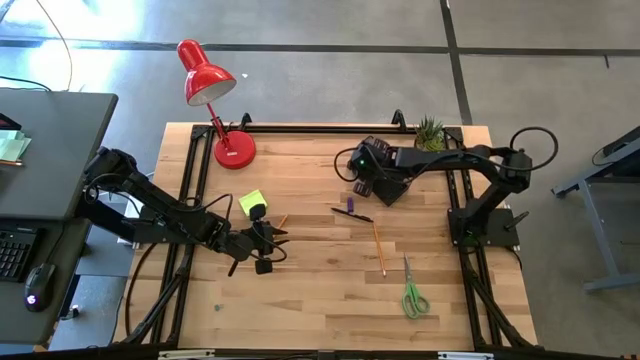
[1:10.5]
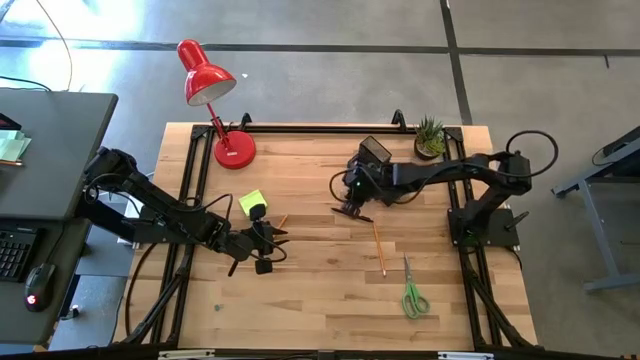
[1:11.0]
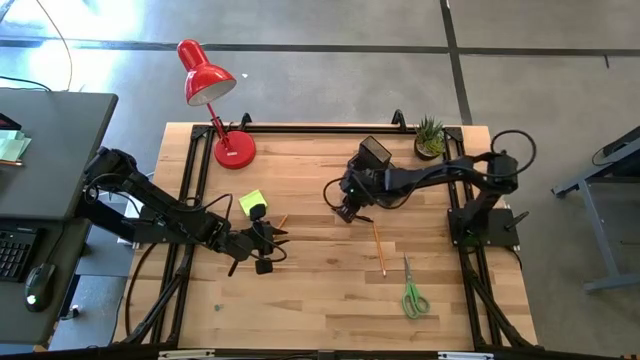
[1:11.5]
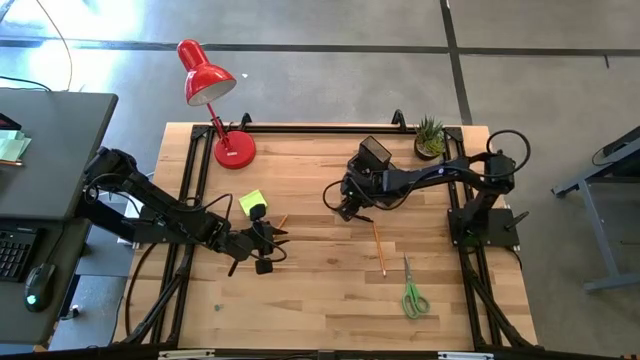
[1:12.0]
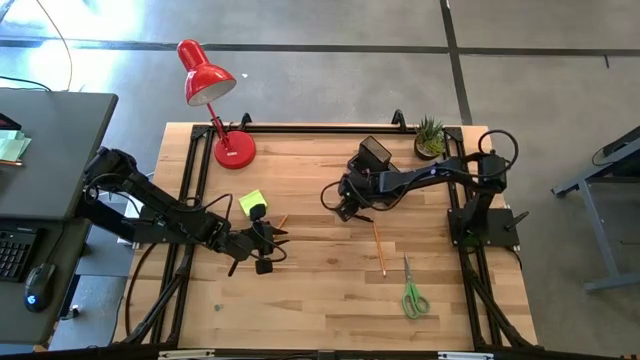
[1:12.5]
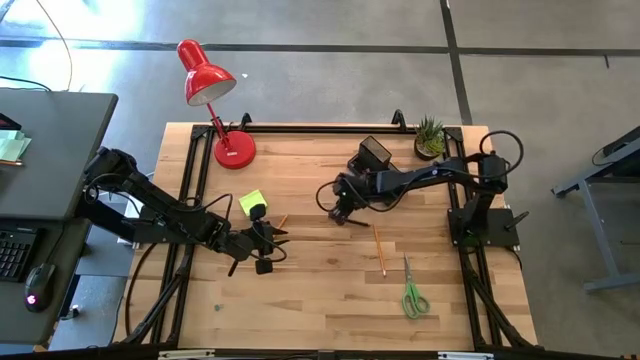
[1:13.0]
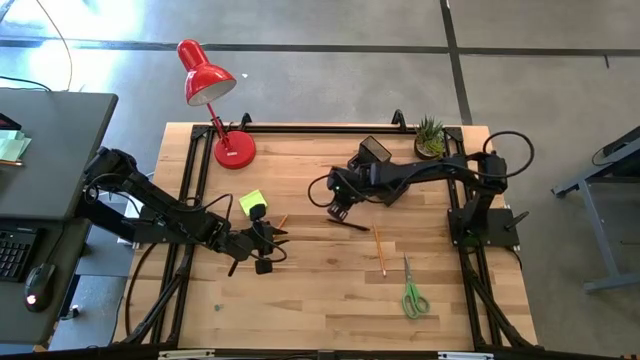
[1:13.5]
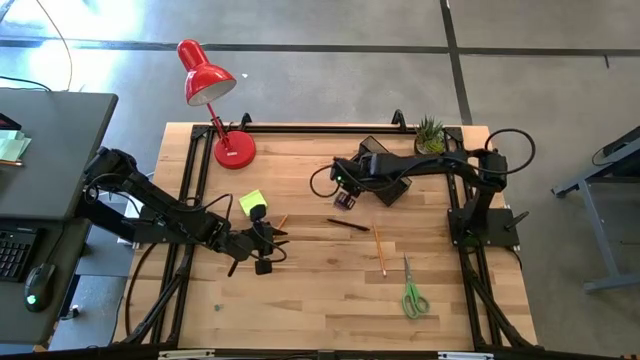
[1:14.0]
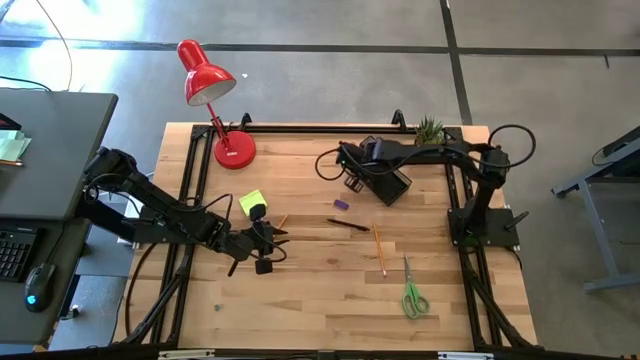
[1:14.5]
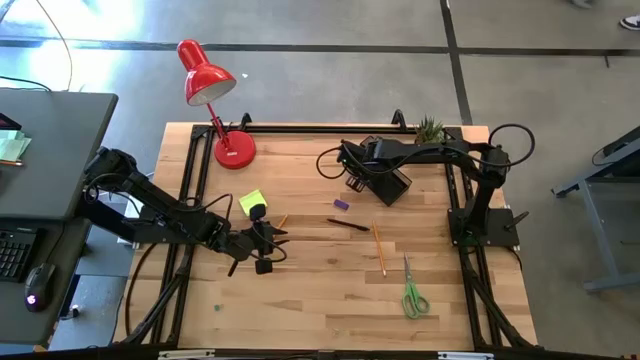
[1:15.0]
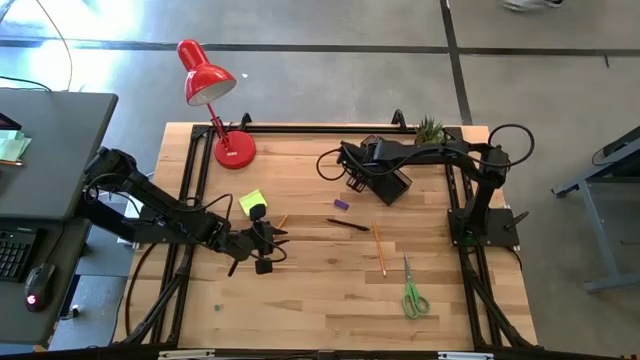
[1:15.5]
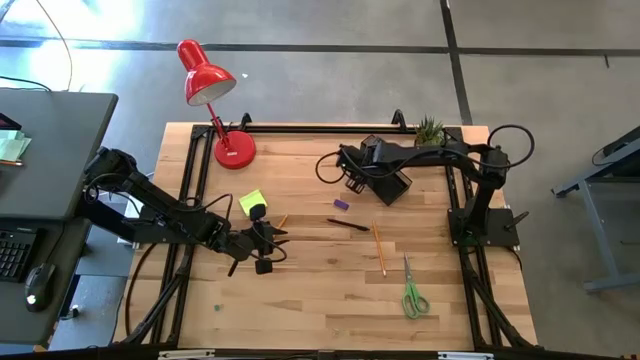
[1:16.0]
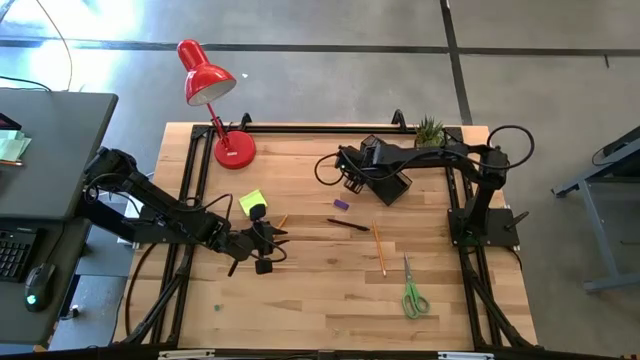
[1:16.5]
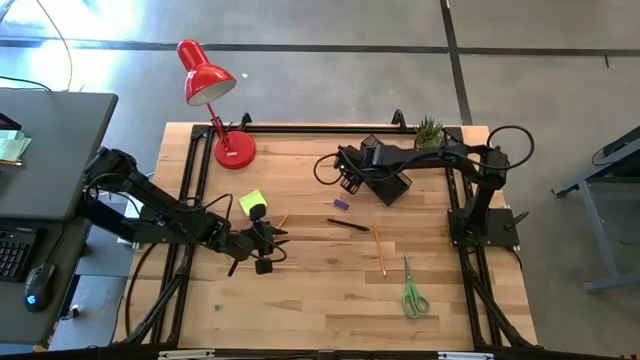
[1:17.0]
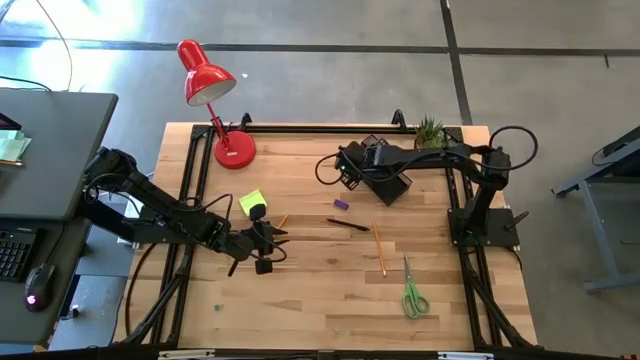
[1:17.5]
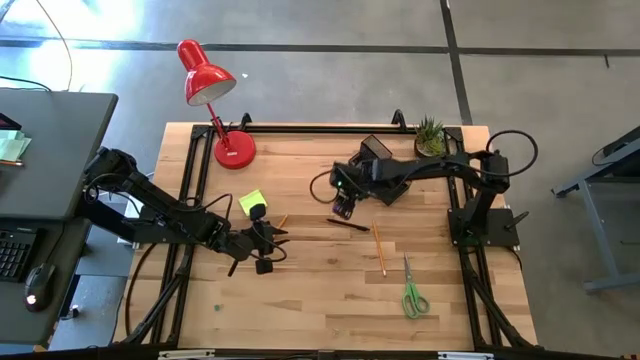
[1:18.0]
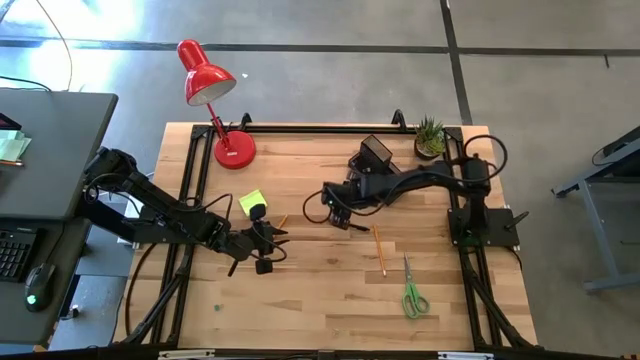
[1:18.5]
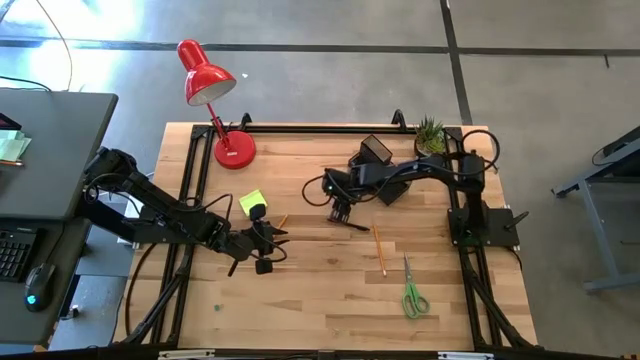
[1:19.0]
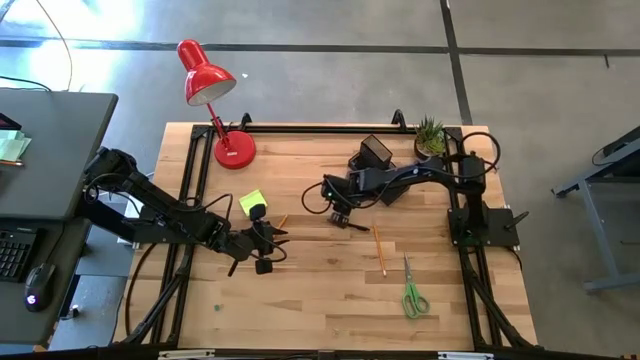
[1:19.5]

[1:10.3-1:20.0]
Task: Pick and place office supplies into organizer
Put the blue eraser into the black desk organizer

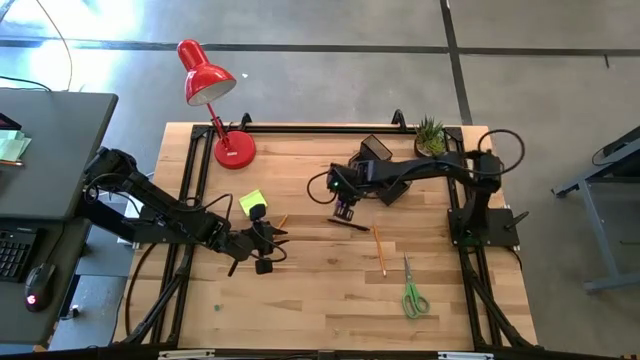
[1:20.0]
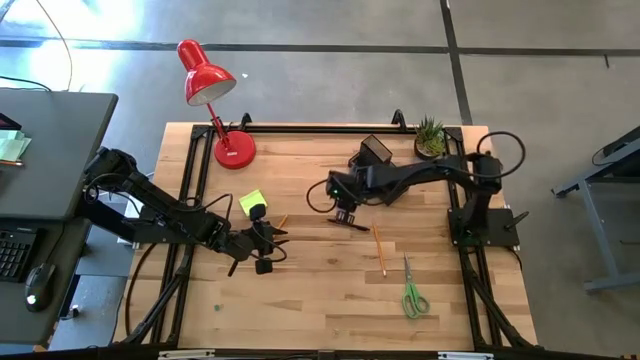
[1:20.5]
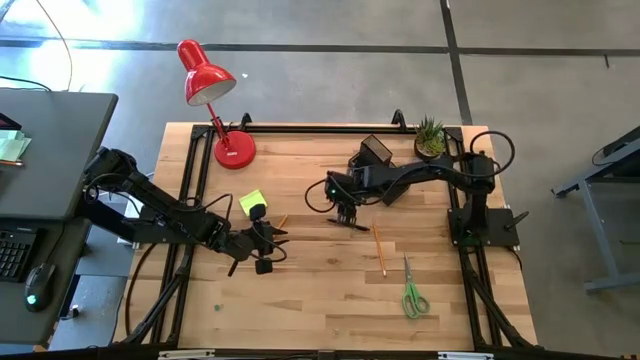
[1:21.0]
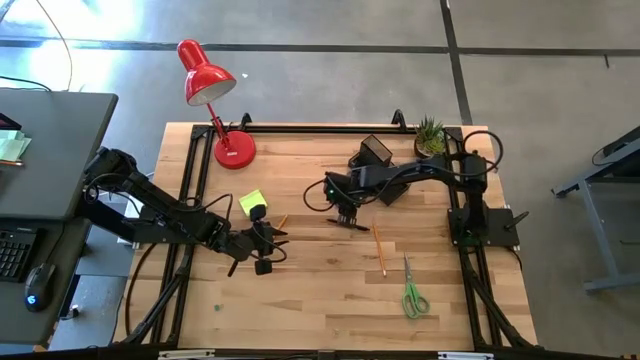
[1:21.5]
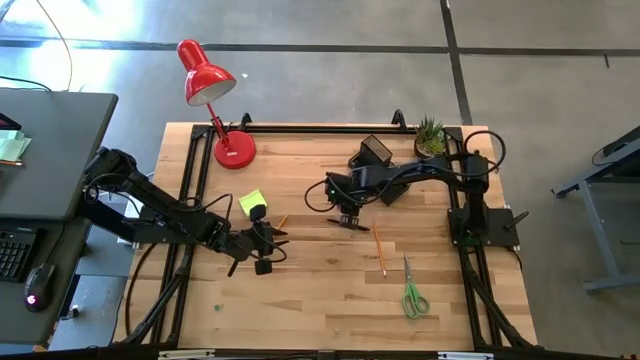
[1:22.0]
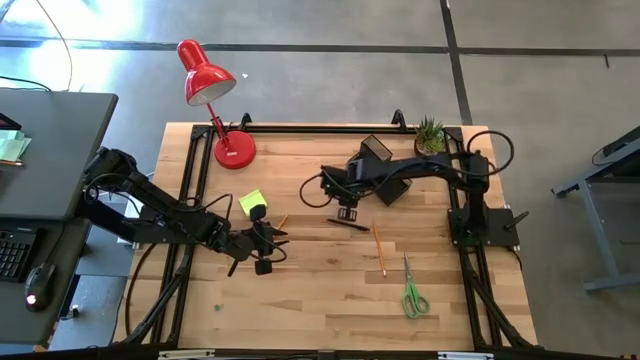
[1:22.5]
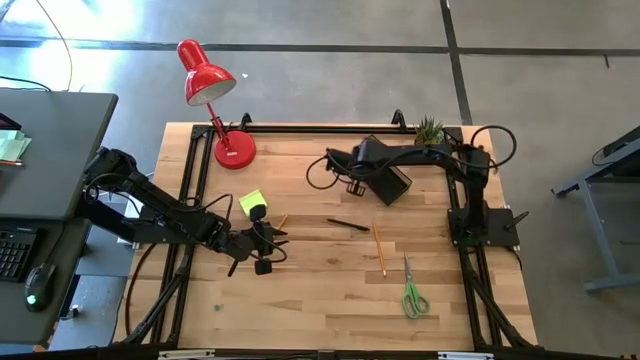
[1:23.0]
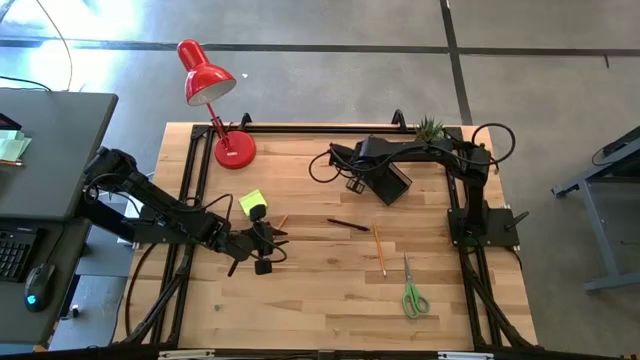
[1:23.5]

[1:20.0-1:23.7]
Put the blue eraser into the black desk organizer

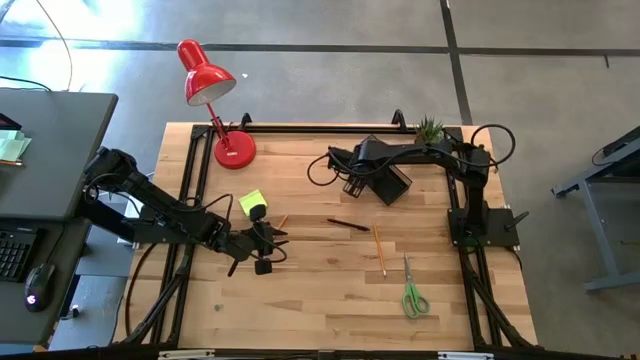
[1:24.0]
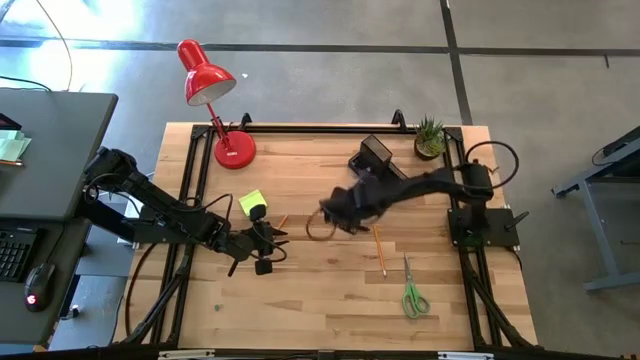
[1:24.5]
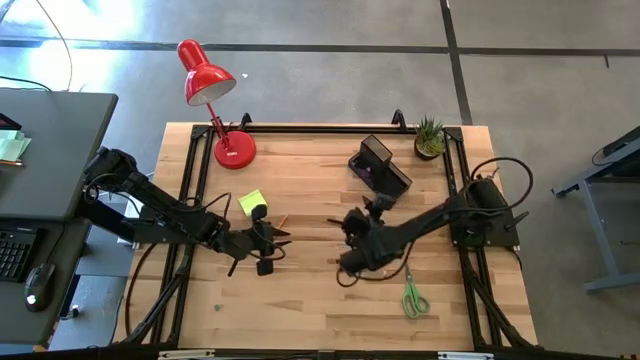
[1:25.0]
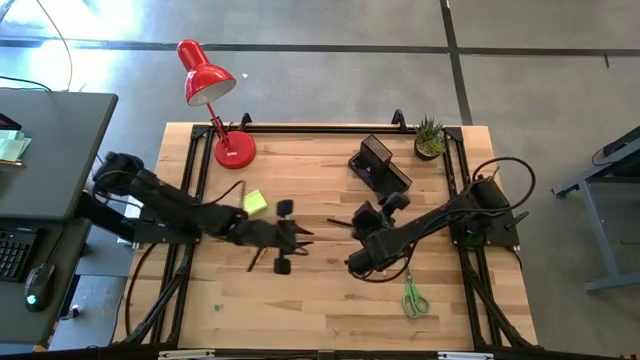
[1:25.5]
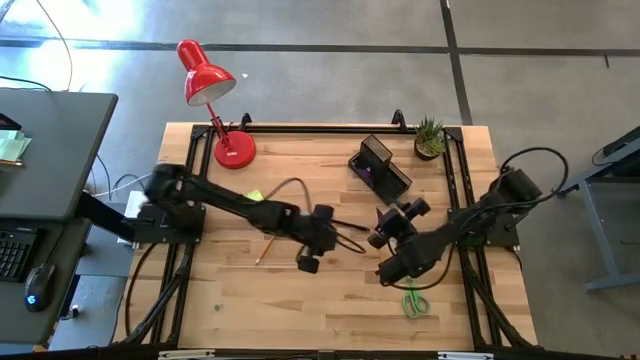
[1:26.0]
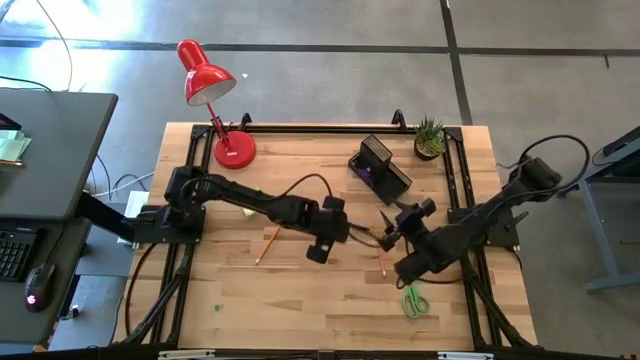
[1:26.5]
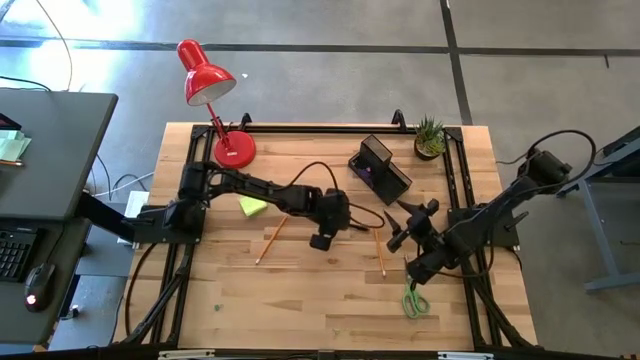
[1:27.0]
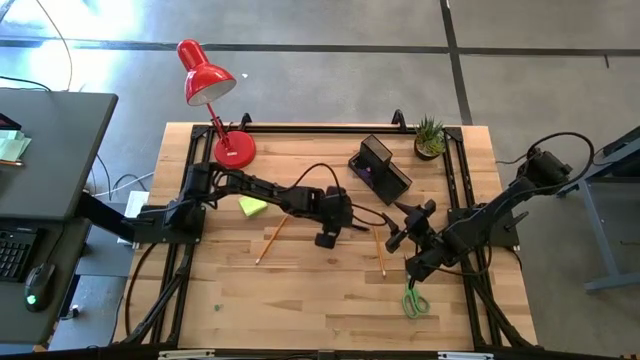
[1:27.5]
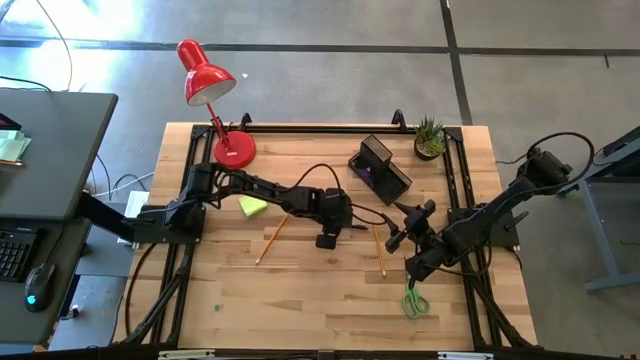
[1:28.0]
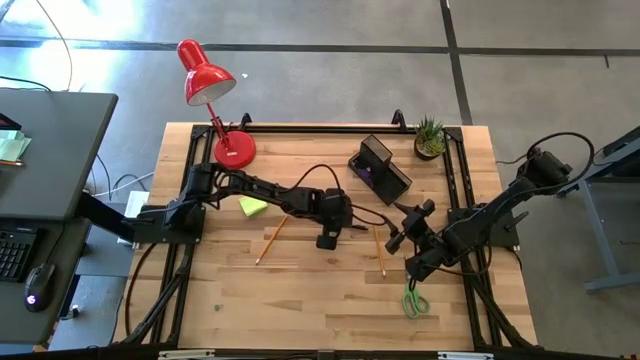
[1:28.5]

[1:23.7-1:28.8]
Put the black pen into the black desk organizer

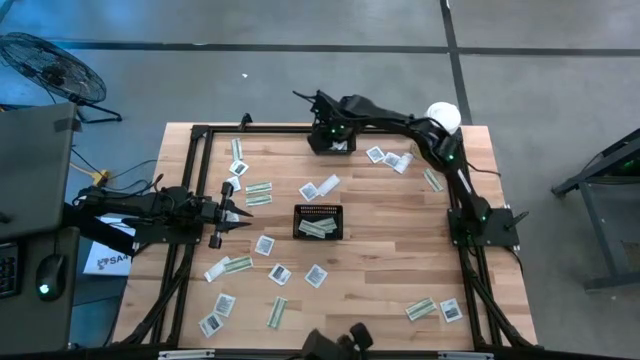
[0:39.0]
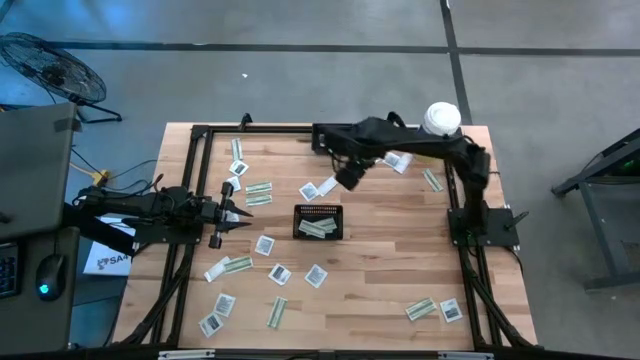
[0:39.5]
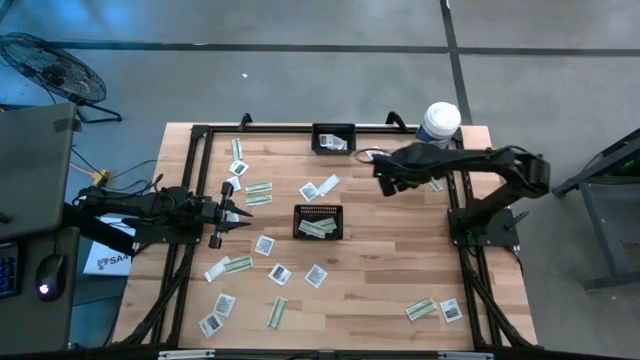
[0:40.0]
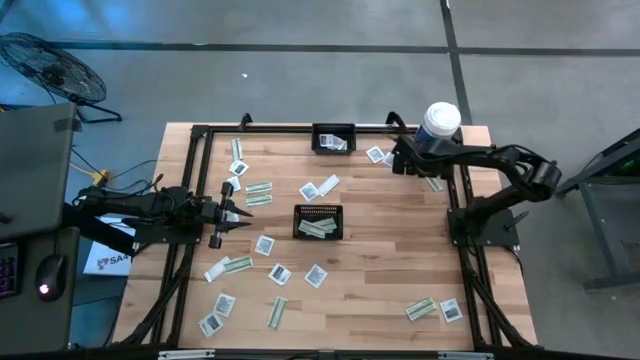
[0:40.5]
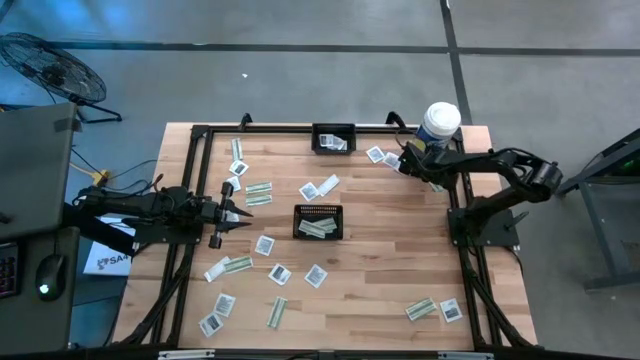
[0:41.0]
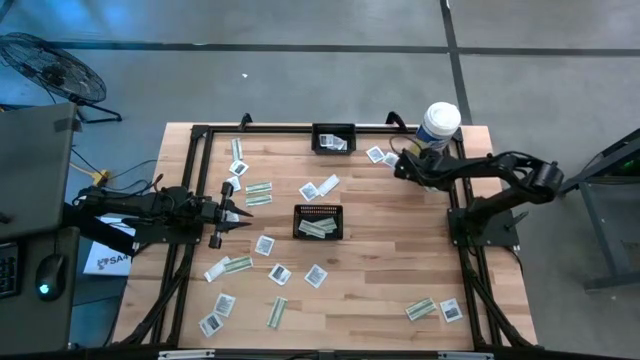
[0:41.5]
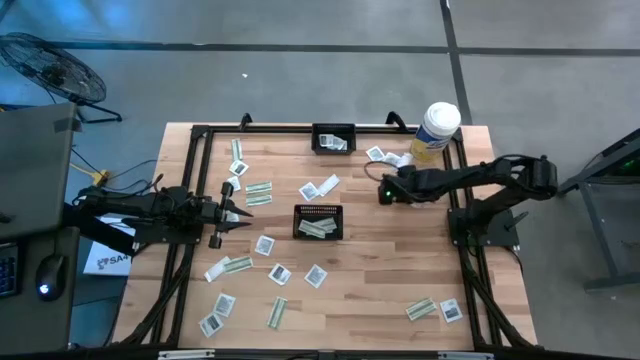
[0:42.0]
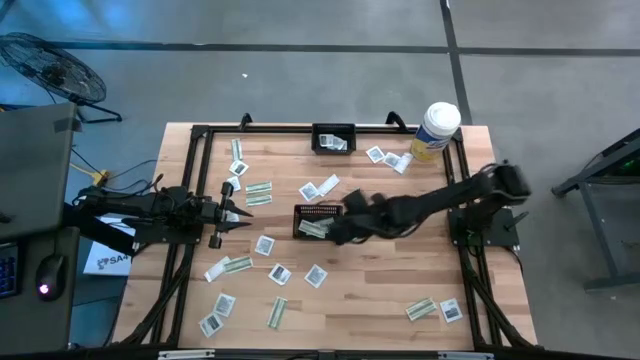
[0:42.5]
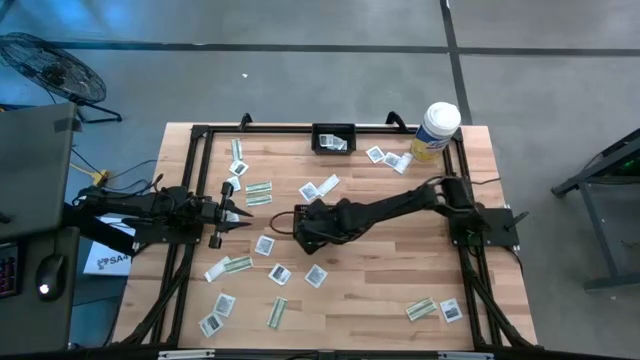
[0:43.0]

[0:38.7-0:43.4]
Task: Pick & Place First Aid Supplies
Put the bandage into the bottom black basket
